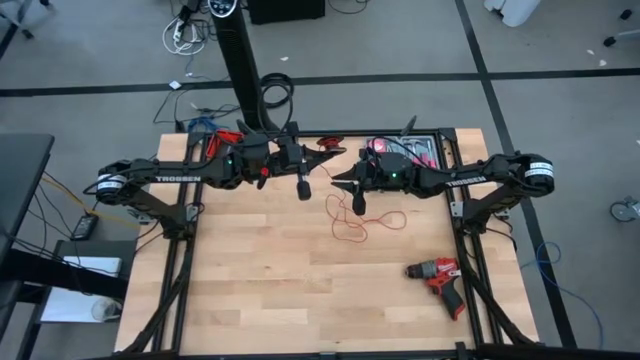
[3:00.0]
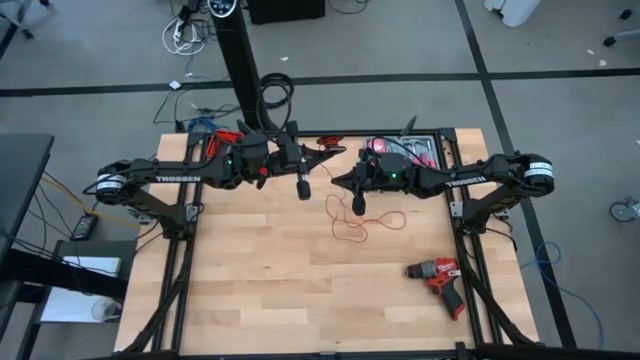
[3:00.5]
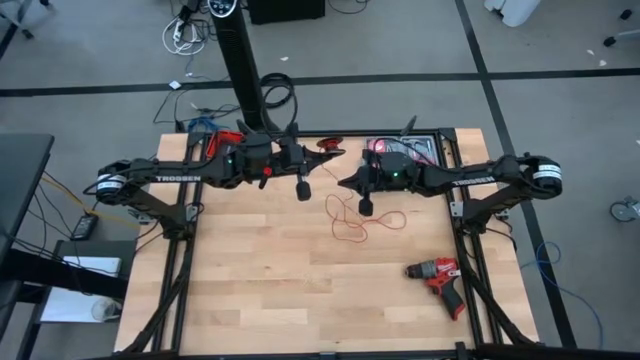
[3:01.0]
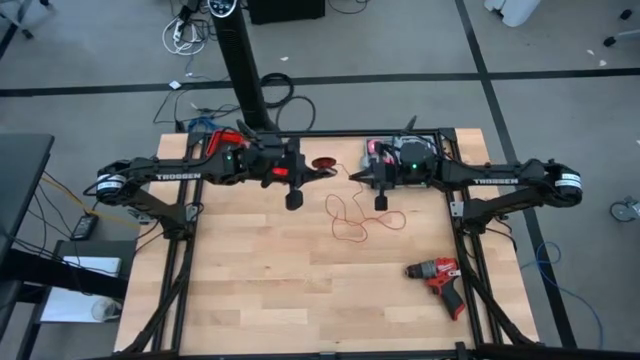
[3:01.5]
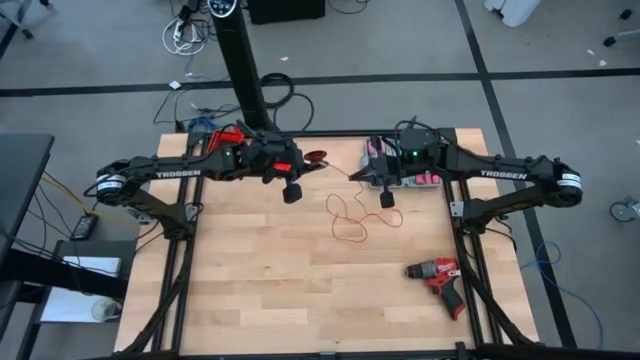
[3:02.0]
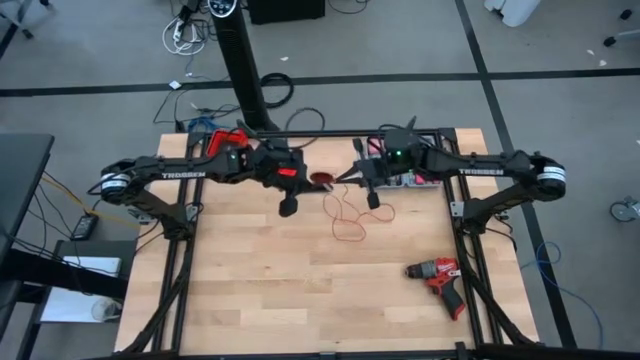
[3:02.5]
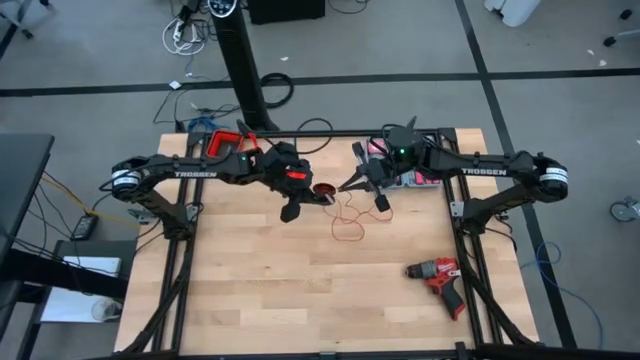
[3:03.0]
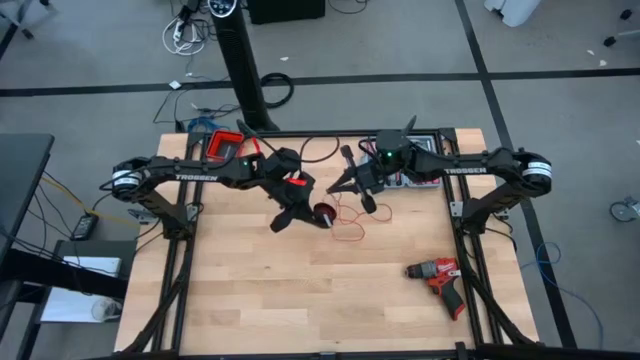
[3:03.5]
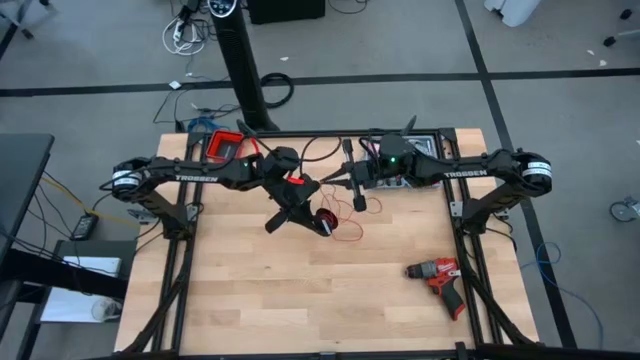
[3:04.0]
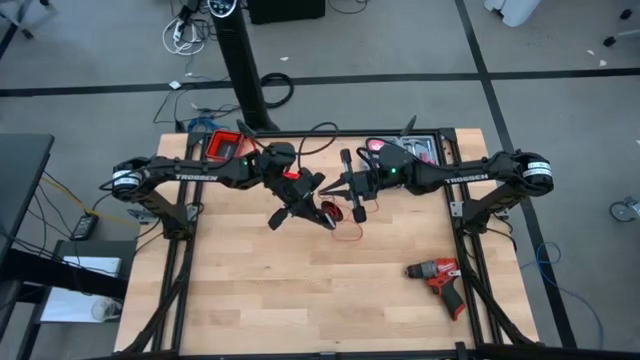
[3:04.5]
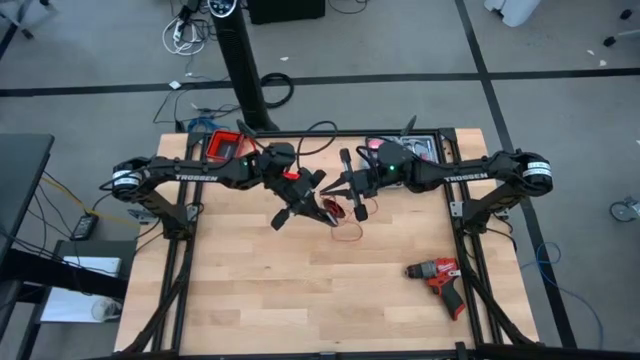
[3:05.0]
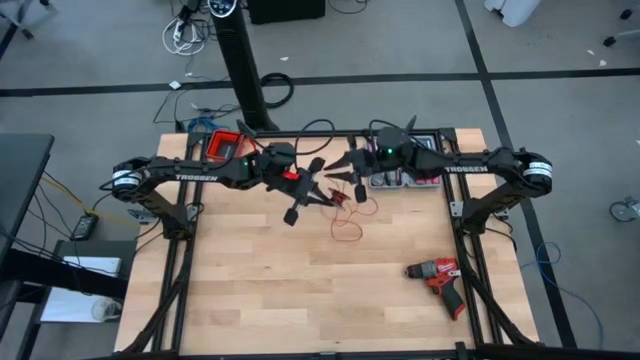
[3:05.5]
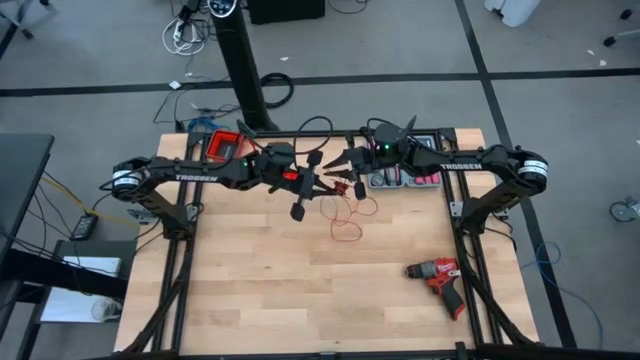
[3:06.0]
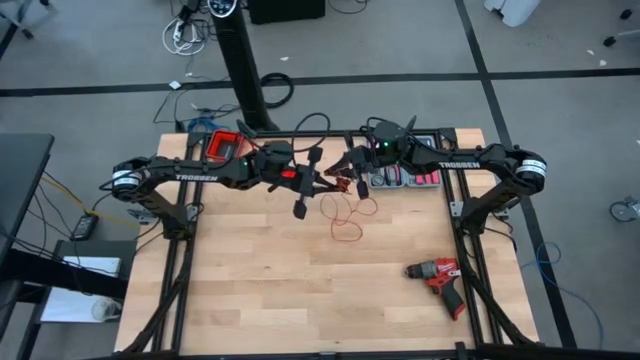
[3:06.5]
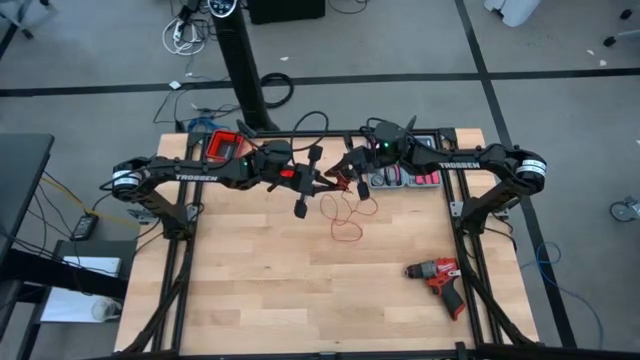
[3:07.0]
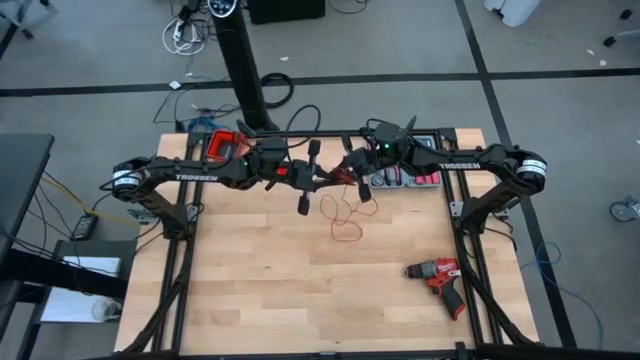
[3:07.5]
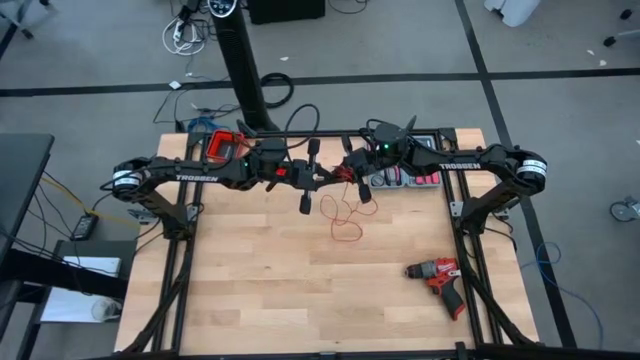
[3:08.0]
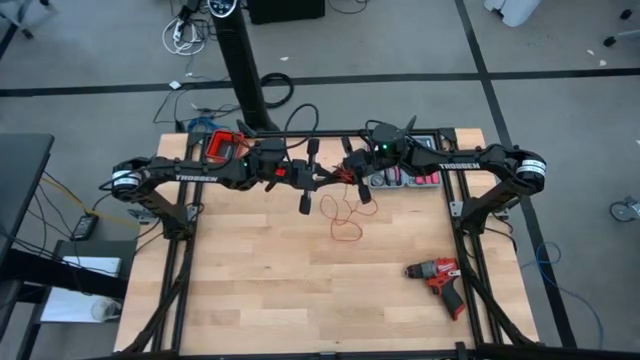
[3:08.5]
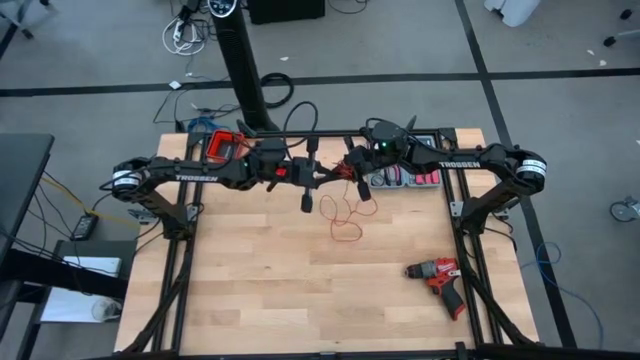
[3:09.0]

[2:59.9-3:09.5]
Task: Coil cords
Coil the red wire onto the black spool

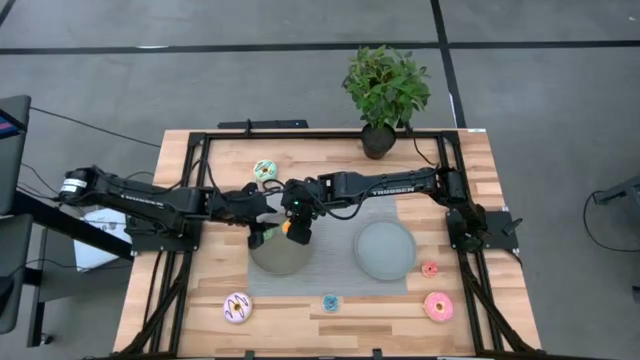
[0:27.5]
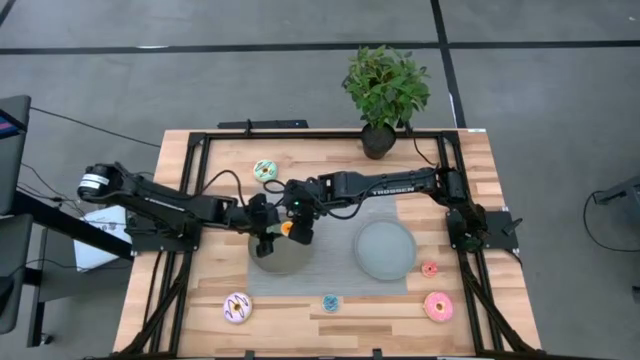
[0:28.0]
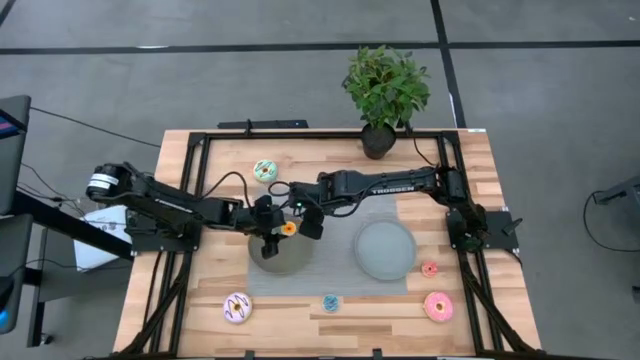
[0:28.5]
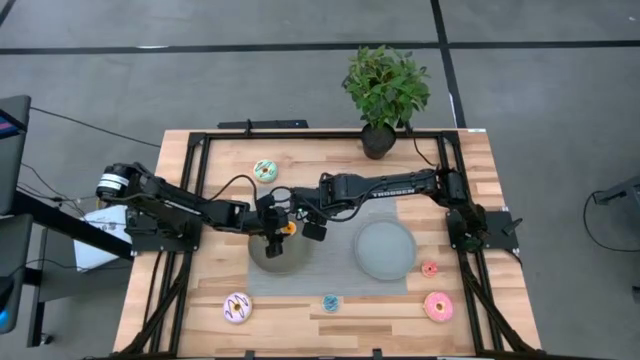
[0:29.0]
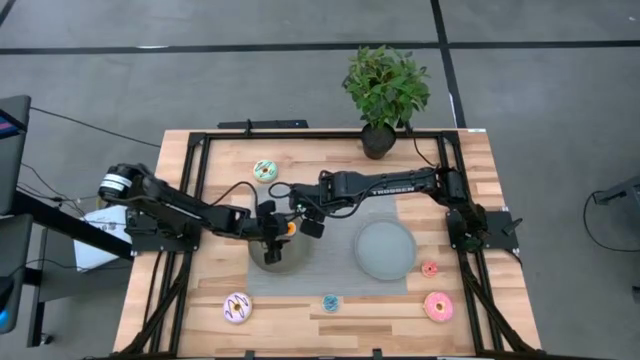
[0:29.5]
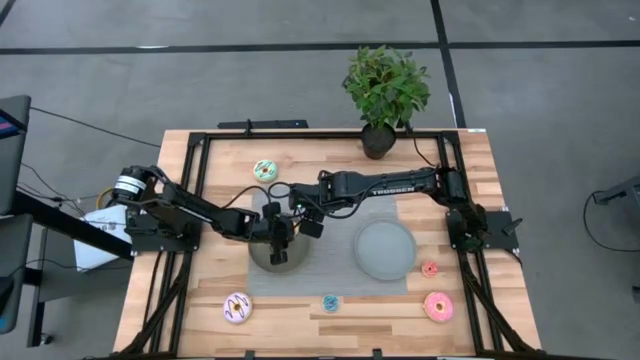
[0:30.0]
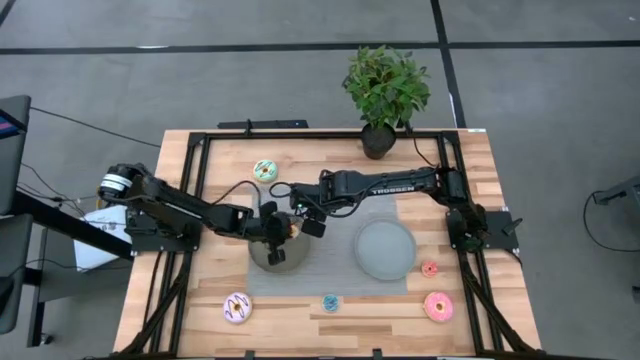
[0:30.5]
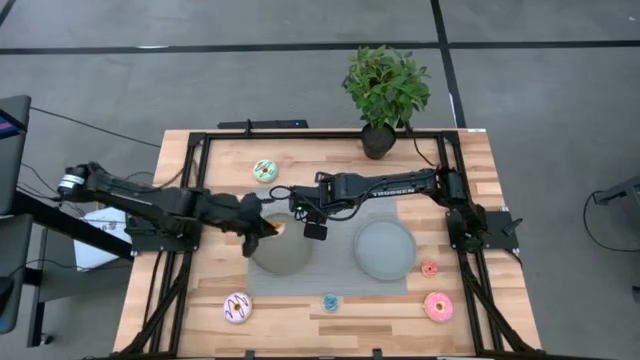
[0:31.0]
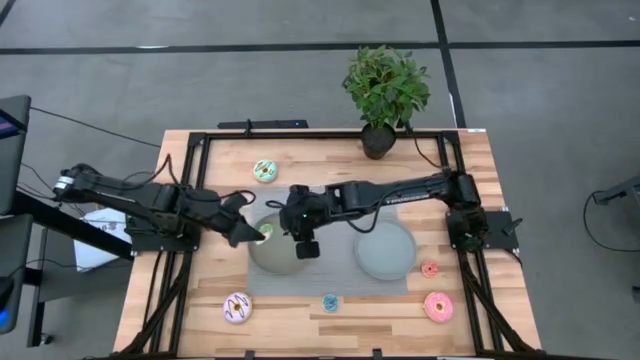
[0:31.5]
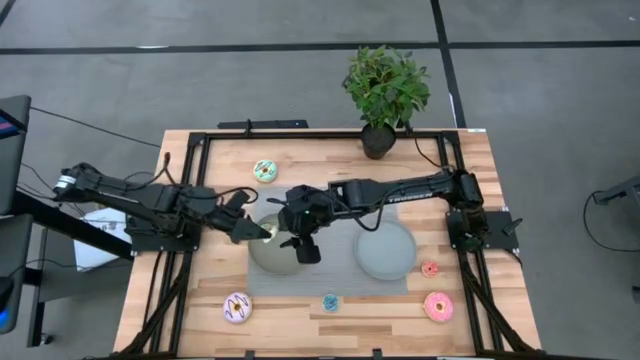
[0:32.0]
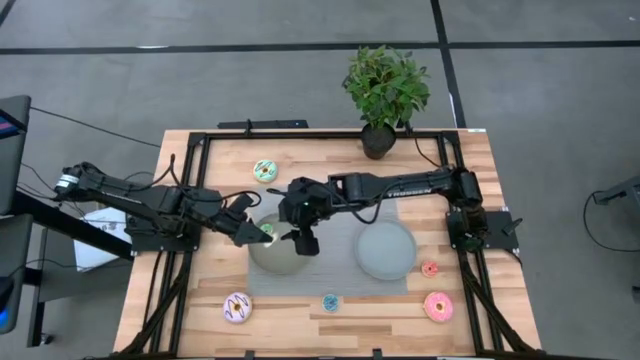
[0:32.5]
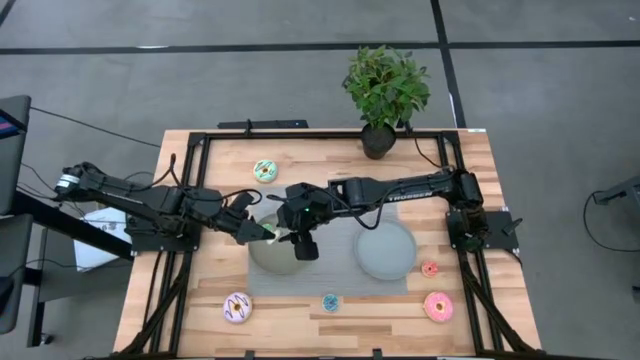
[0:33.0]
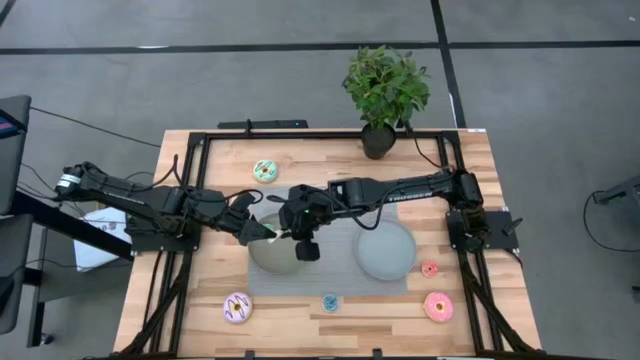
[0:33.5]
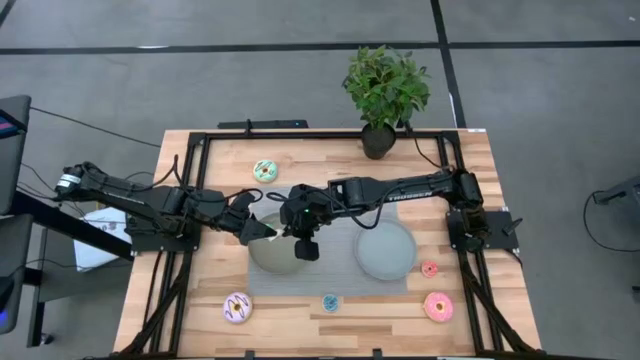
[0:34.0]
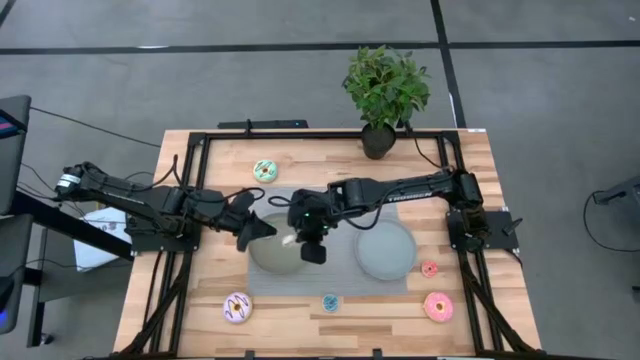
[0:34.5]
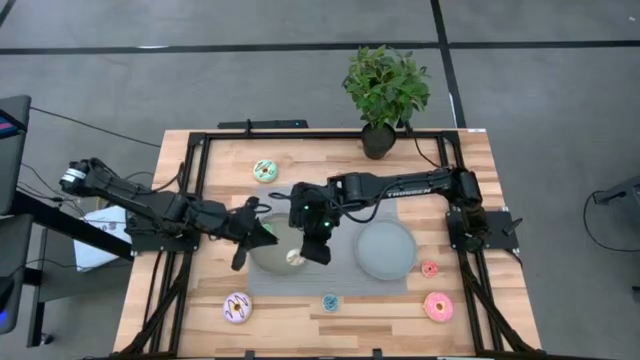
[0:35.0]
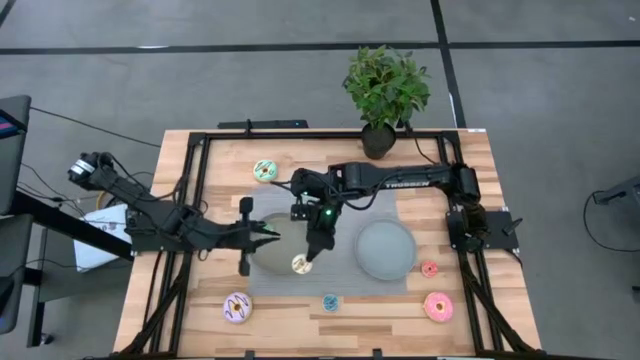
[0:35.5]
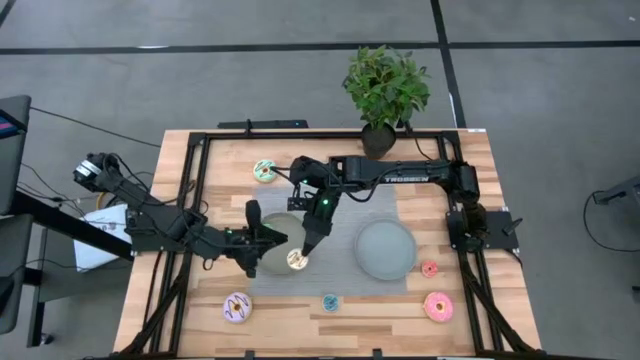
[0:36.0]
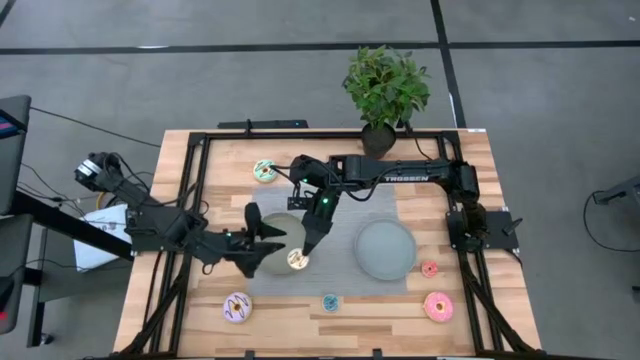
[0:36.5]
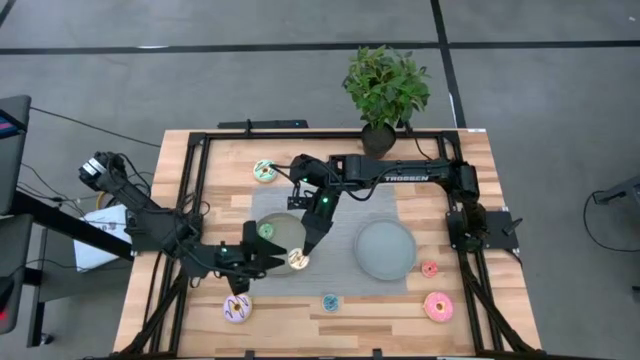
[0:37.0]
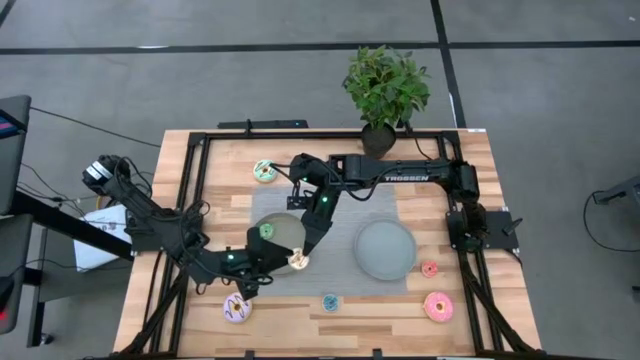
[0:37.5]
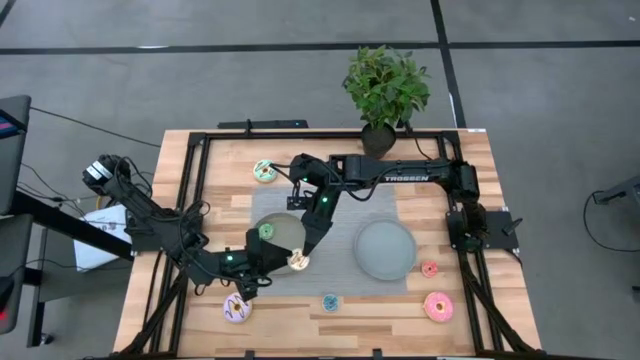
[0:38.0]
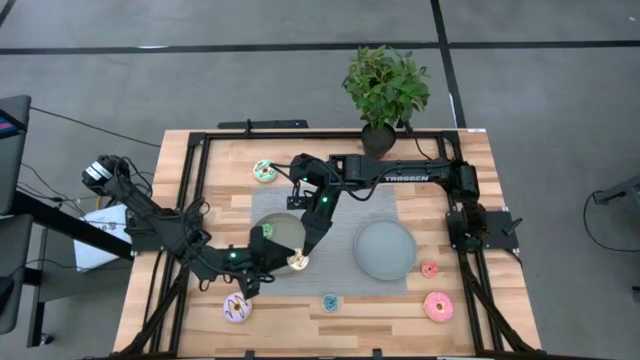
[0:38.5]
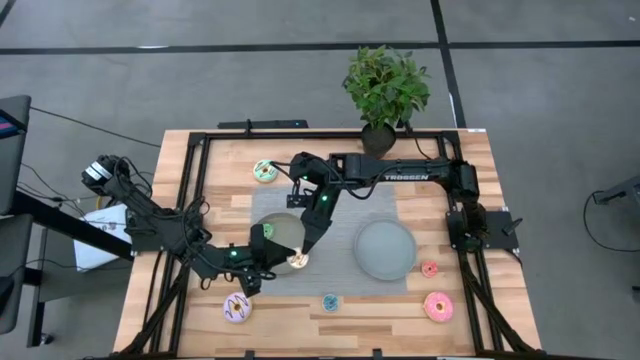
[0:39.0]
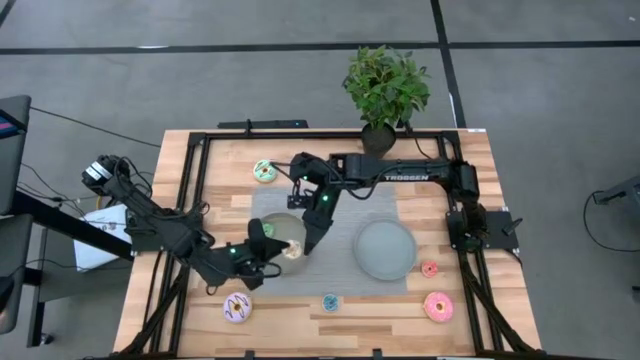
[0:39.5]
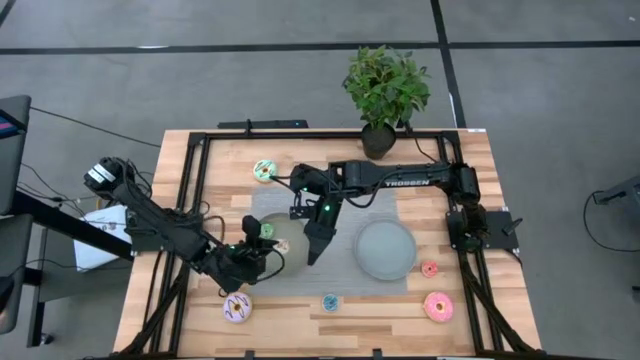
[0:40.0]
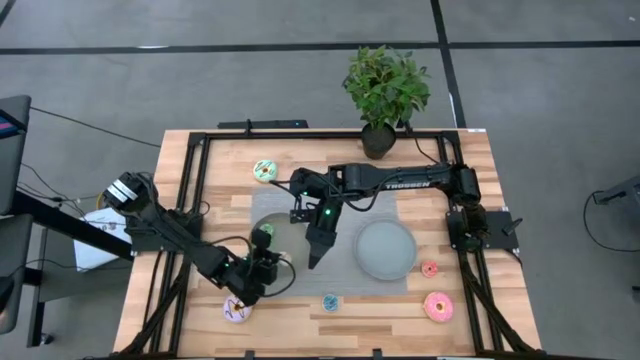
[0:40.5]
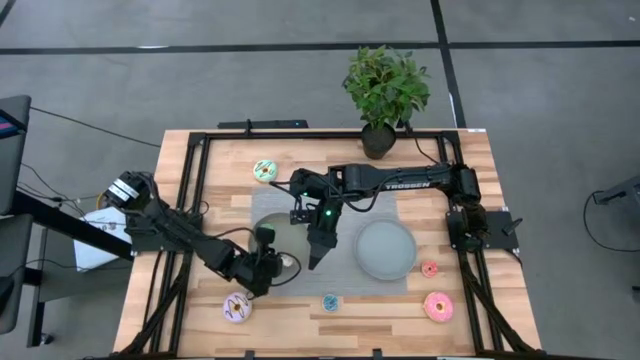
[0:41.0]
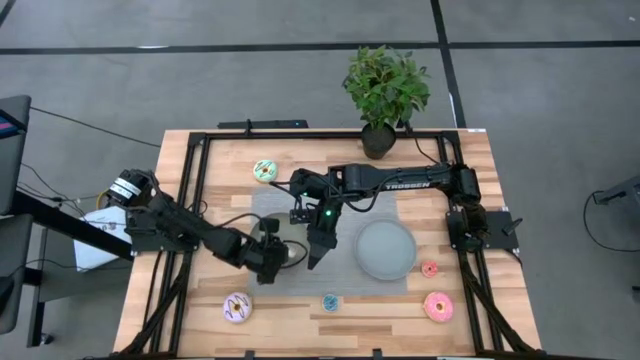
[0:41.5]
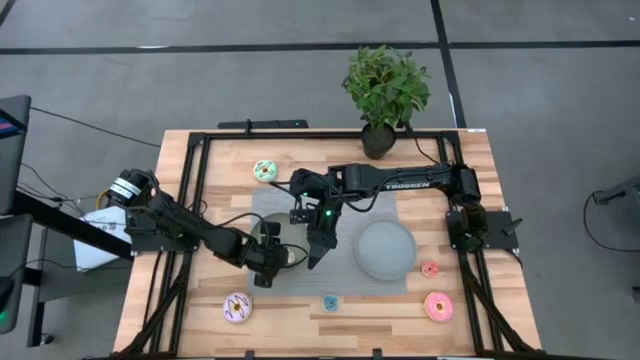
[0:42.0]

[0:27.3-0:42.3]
Task: Pick & Place donuts
Put the small white donut on the dark gray plate
